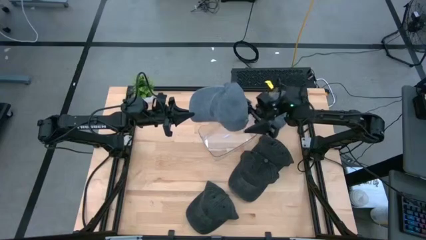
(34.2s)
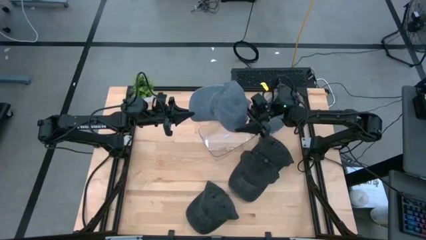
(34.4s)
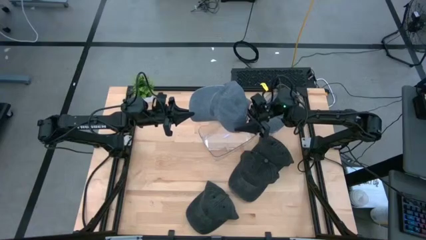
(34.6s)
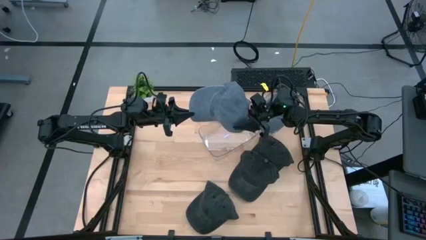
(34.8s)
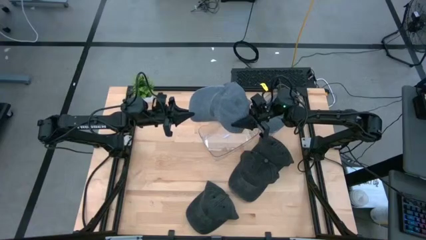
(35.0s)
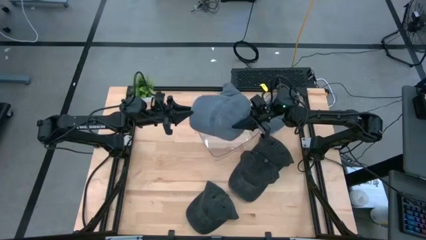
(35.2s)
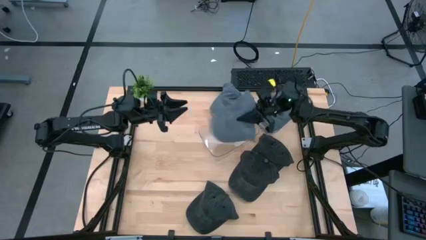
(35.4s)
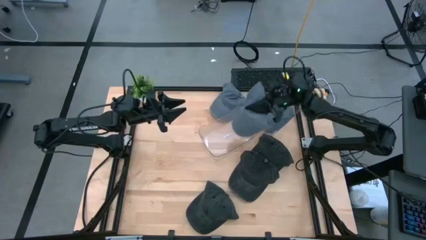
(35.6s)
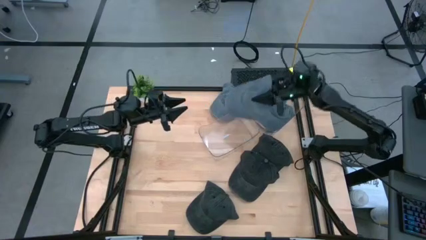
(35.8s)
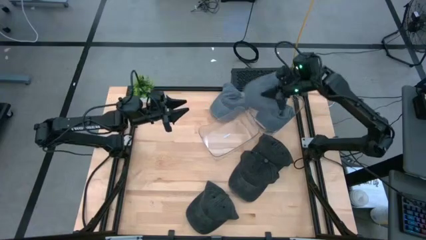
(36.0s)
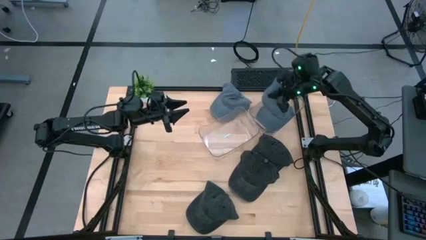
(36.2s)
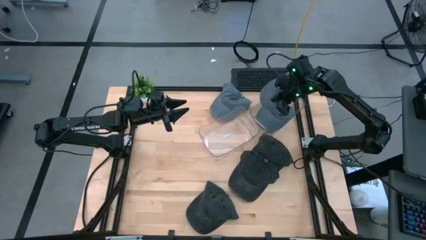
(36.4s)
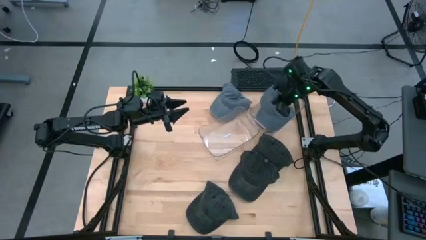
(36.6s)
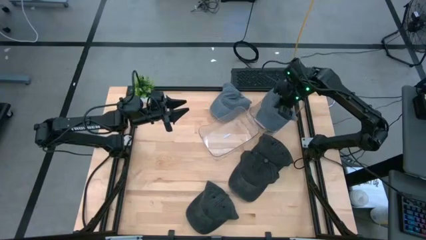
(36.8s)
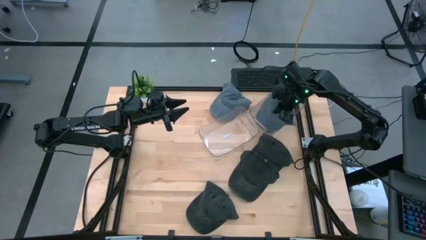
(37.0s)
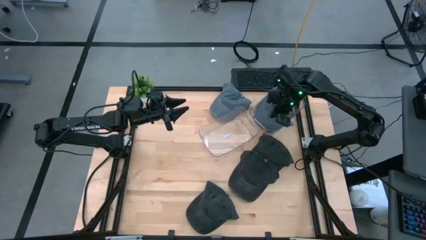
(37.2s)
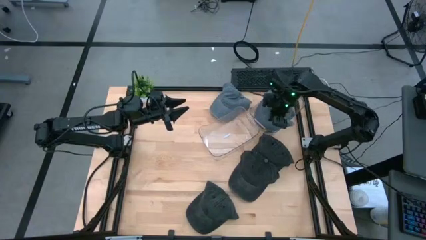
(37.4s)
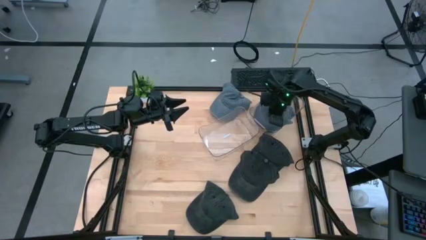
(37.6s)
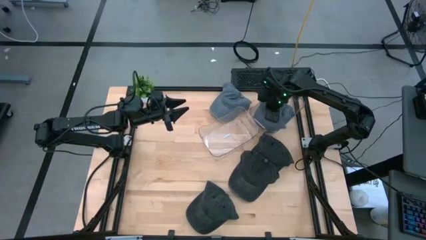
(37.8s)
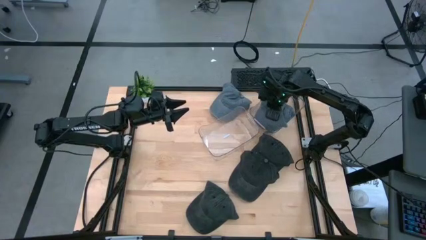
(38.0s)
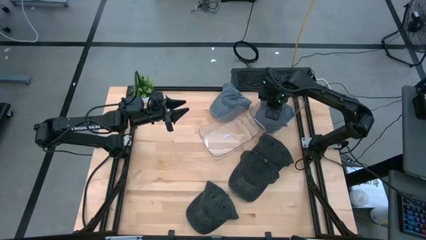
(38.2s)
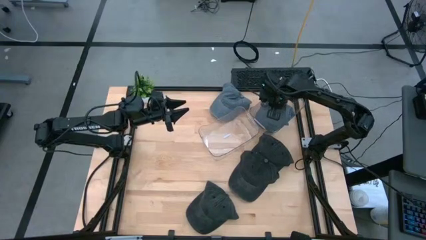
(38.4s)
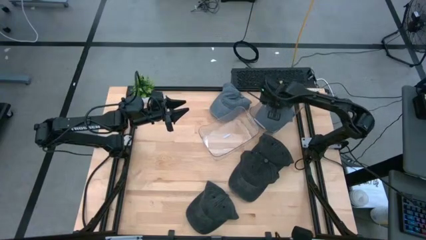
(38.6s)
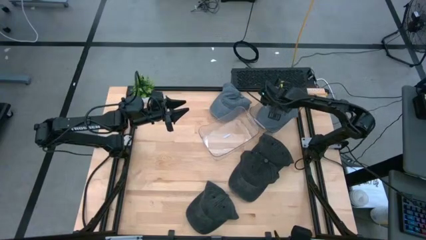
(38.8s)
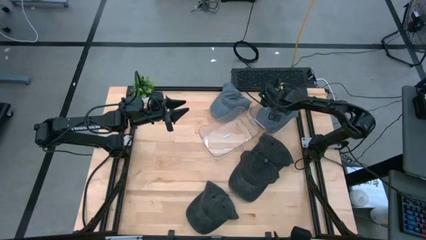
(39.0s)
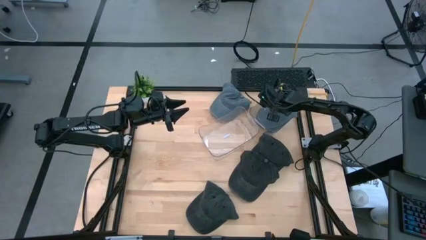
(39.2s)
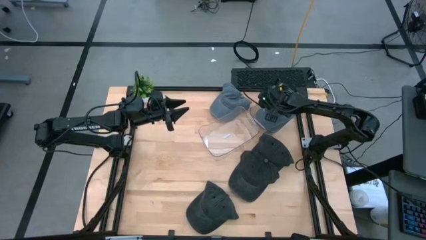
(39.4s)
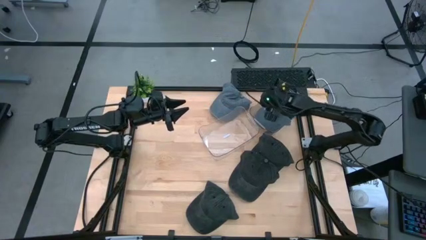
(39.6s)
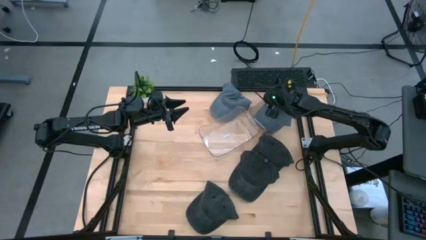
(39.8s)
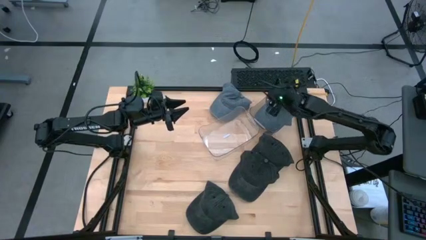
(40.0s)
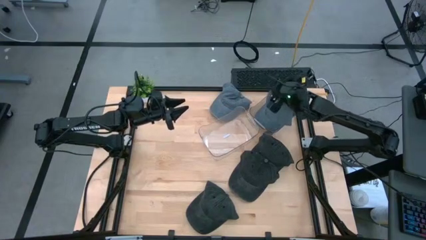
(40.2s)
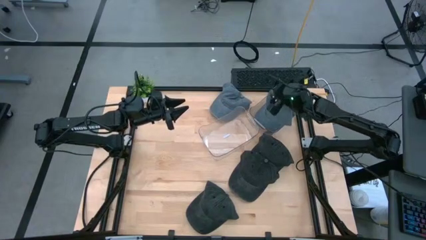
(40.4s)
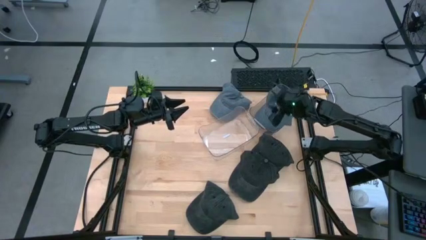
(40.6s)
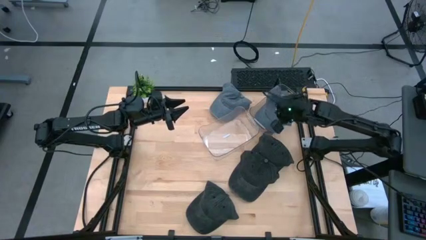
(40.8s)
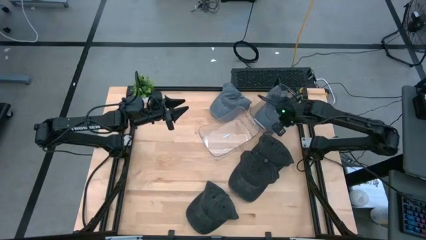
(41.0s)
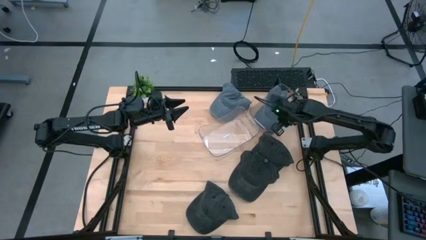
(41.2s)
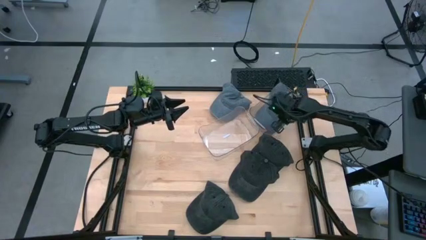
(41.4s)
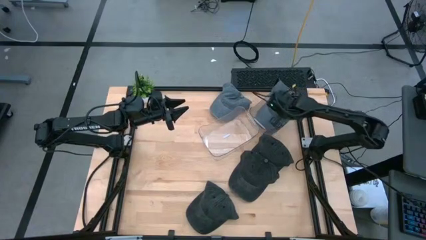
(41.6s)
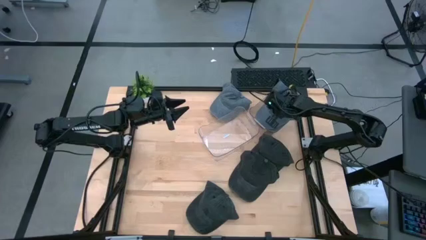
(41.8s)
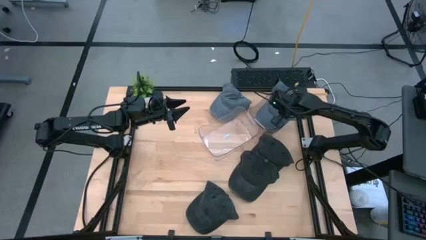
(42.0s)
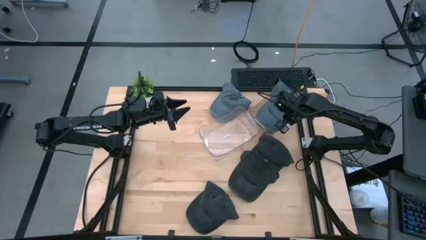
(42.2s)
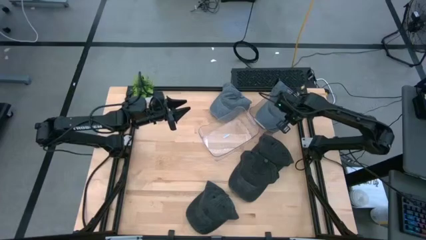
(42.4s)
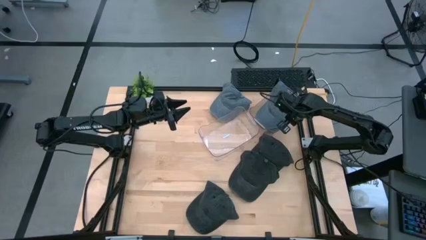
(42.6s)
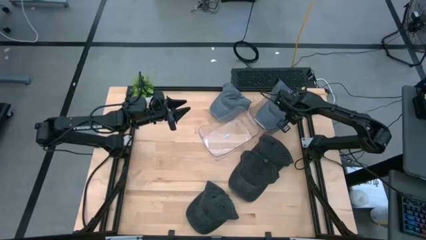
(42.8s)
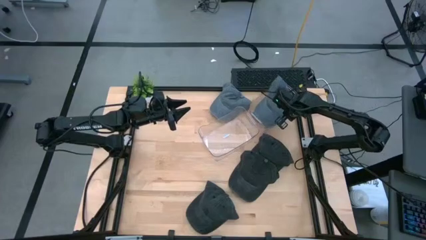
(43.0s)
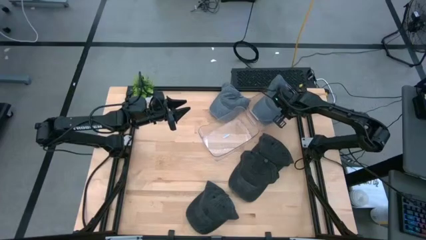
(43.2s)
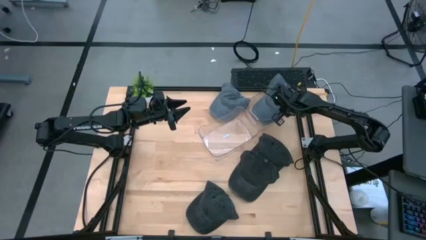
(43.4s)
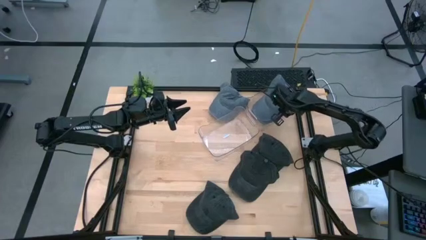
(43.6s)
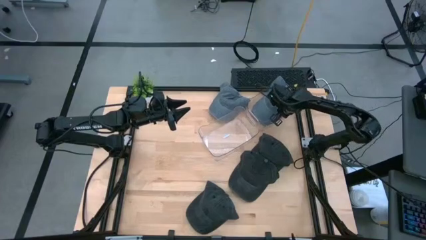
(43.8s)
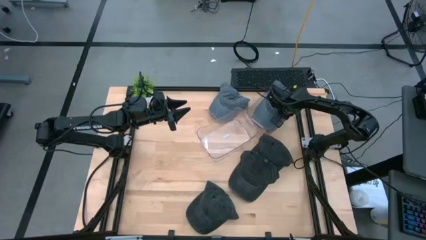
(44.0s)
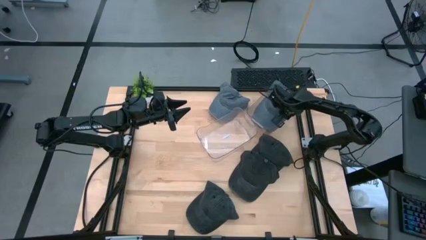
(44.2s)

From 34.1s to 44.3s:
Task: Pick & Place hat
Stack the left gray cap on top of the gray cap in the right transparent bin

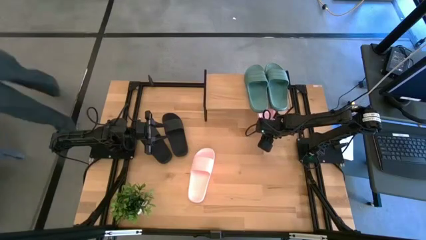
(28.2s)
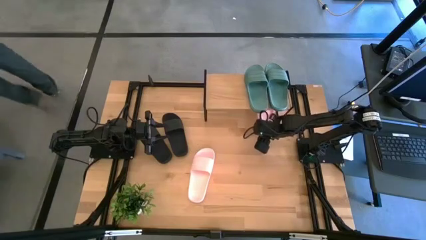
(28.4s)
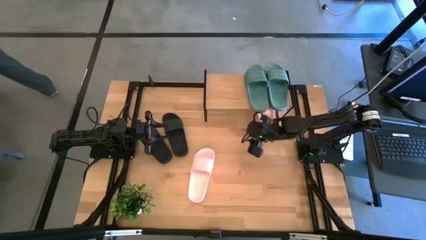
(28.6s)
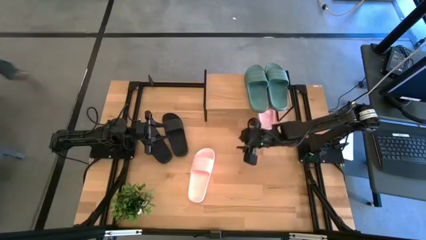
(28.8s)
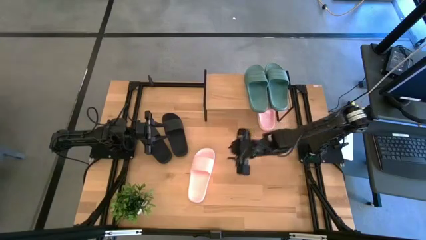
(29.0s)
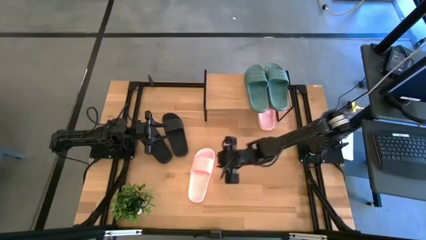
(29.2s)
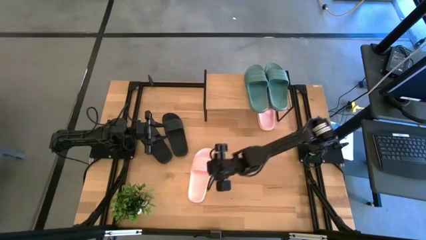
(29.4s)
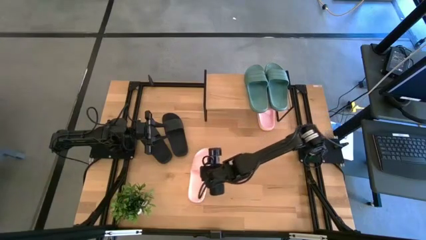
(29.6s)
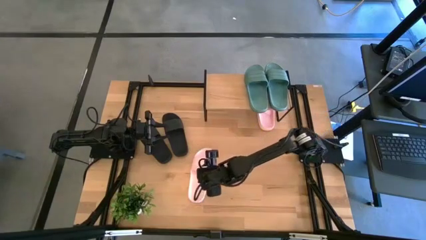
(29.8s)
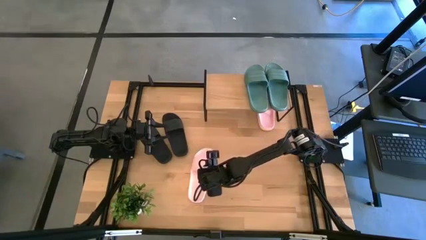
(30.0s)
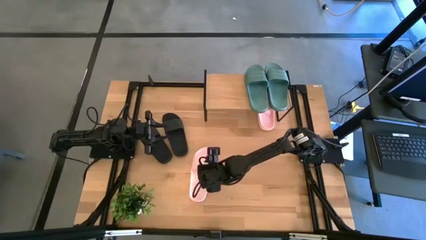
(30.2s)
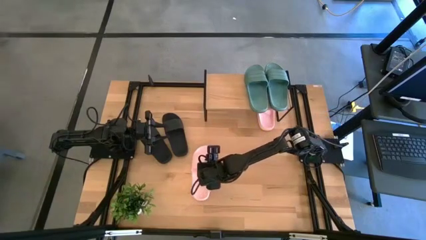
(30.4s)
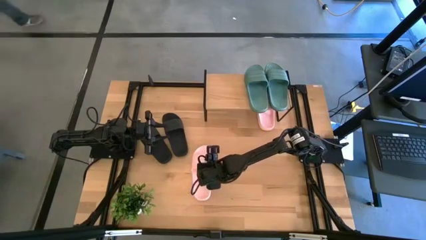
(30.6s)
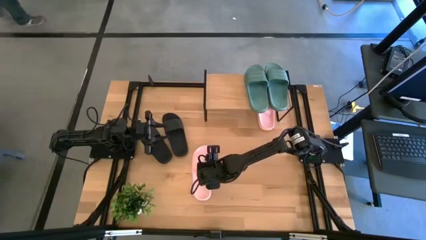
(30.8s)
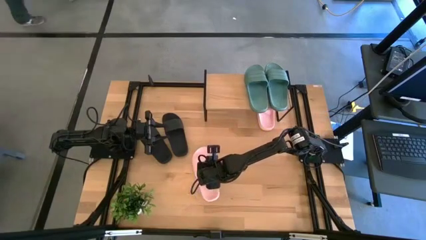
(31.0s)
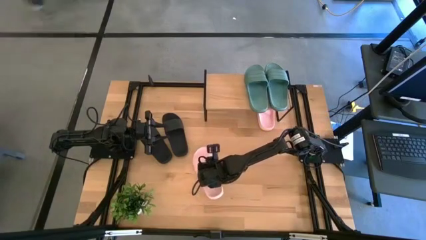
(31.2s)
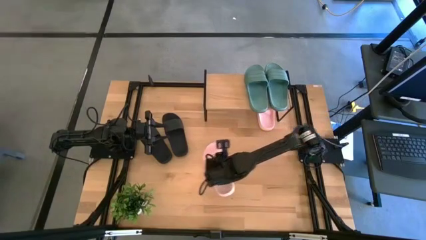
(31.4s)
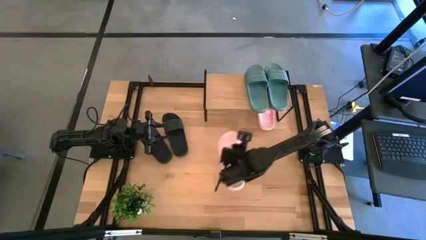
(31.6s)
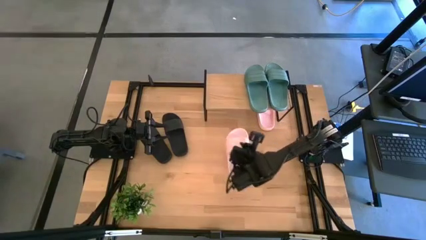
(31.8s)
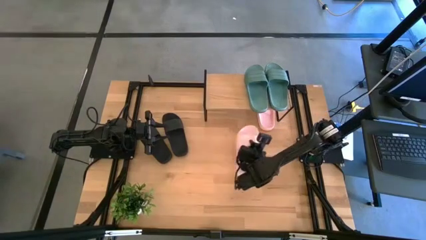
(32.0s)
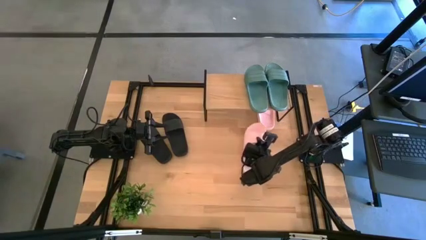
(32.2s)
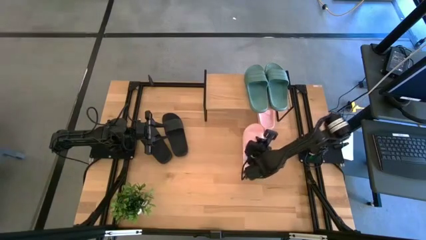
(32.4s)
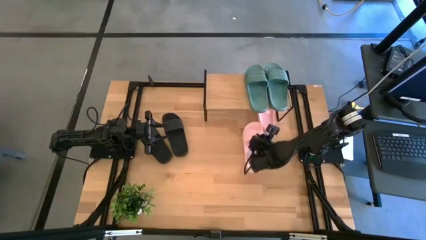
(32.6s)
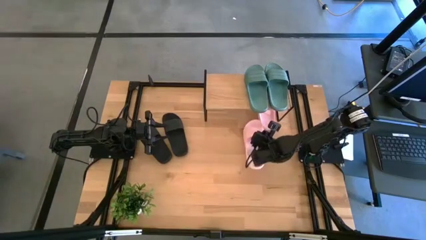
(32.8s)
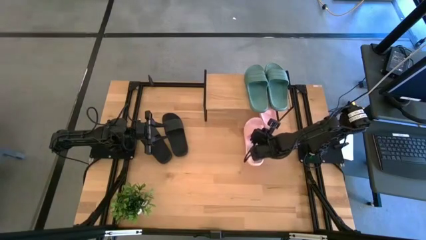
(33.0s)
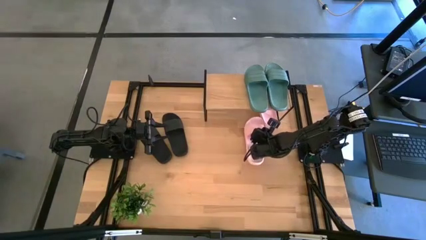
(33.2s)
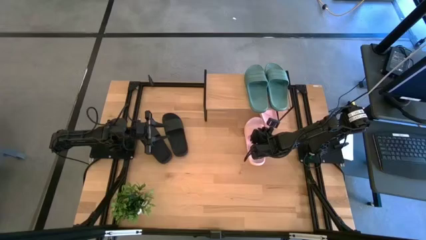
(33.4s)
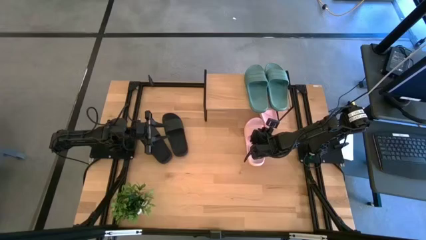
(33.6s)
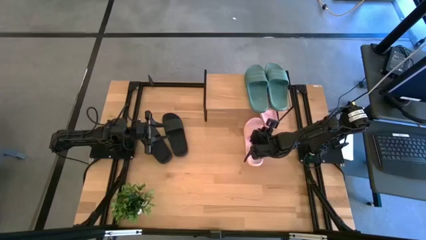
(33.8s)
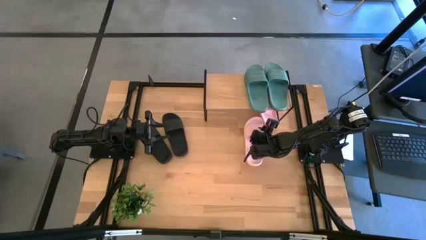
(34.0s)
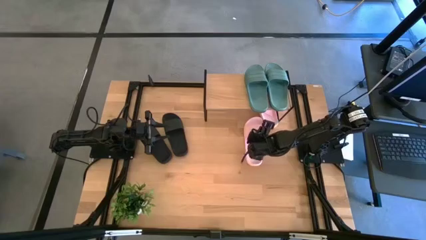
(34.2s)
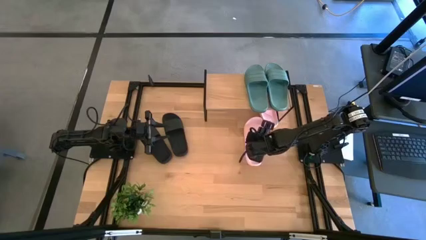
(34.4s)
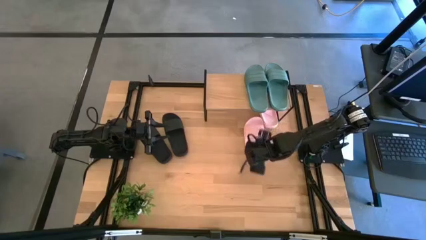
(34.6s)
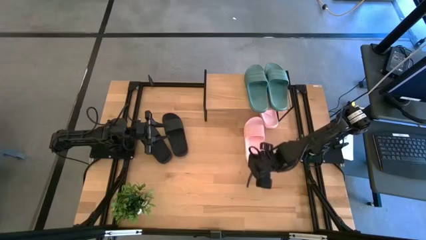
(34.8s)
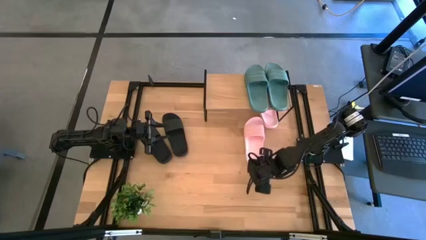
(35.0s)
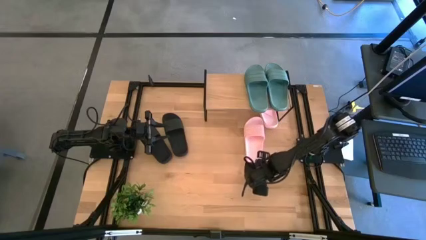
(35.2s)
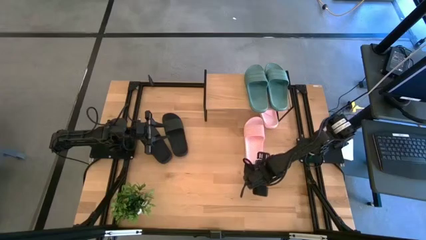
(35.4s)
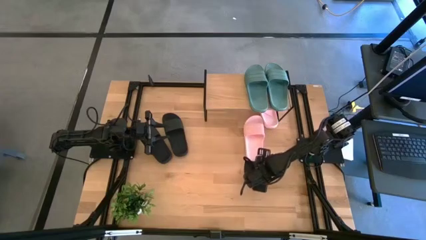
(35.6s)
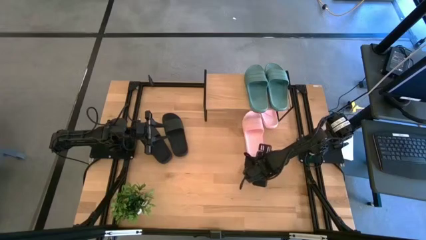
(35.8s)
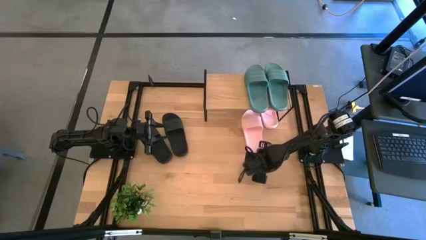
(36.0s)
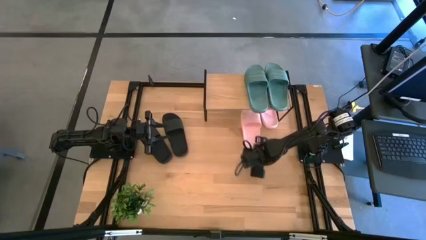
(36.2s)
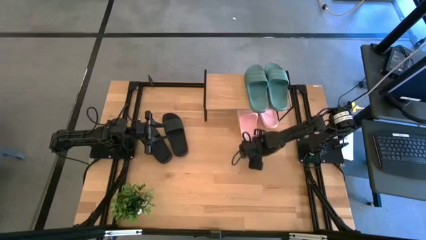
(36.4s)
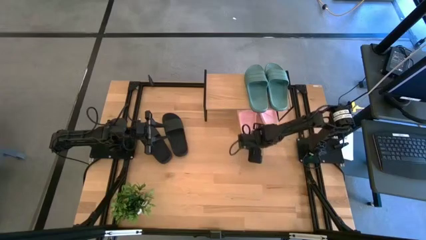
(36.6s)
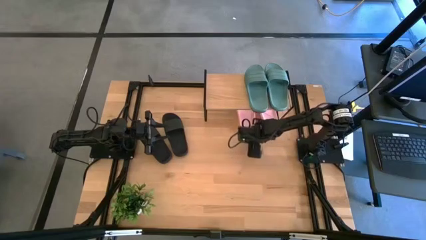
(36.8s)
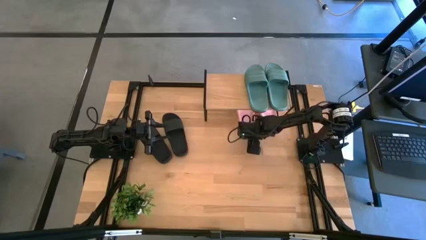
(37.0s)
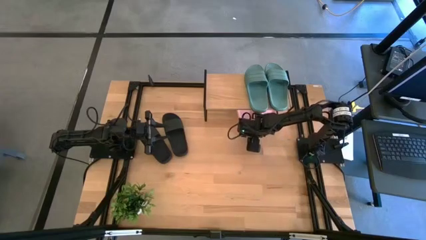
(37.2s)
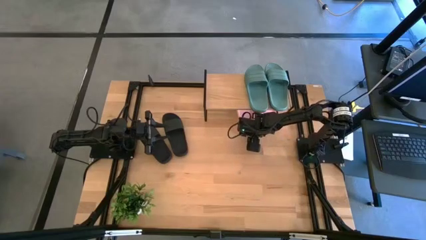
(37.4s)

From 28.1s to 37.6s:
Task: Pick and place slides into the shelf
Put the pink slide under the shelf
